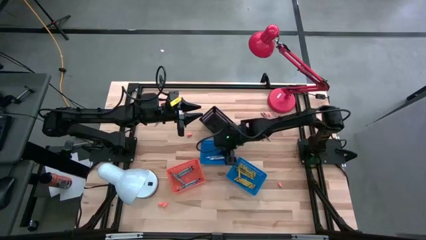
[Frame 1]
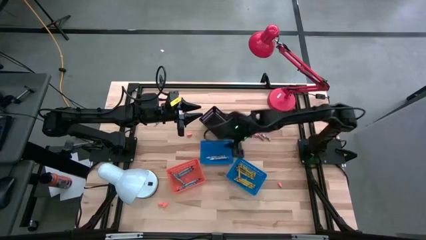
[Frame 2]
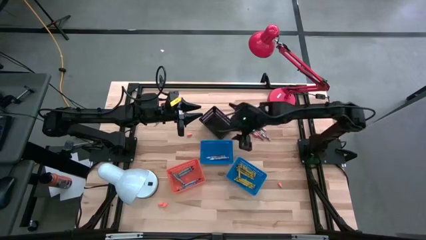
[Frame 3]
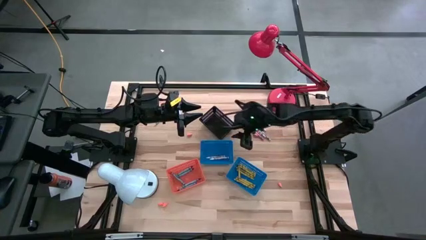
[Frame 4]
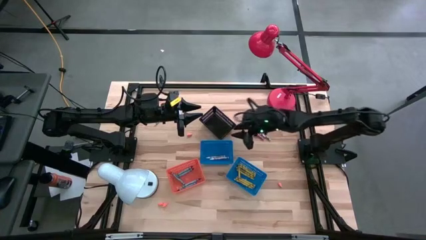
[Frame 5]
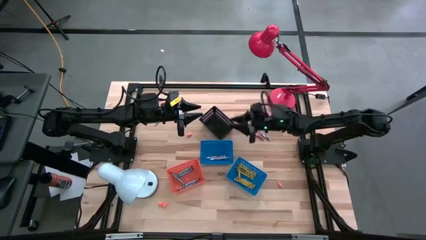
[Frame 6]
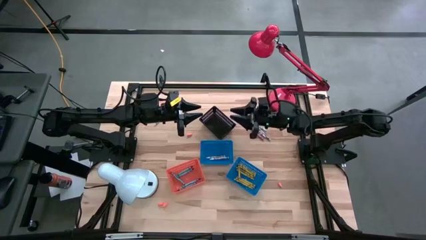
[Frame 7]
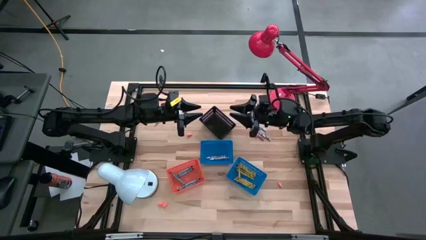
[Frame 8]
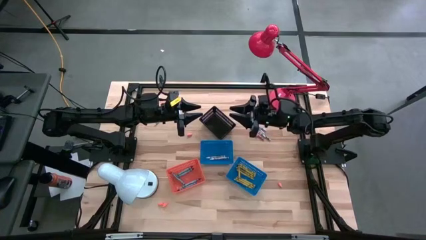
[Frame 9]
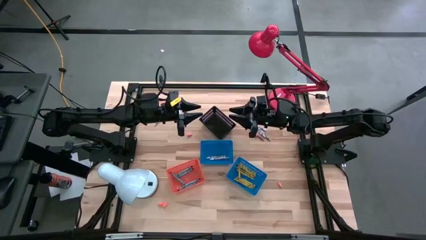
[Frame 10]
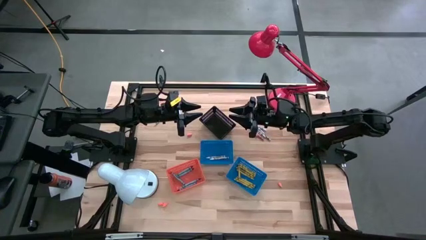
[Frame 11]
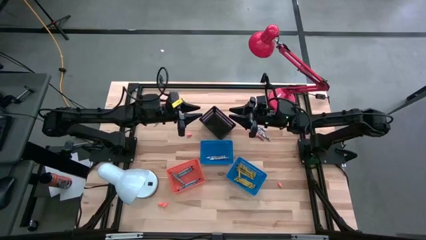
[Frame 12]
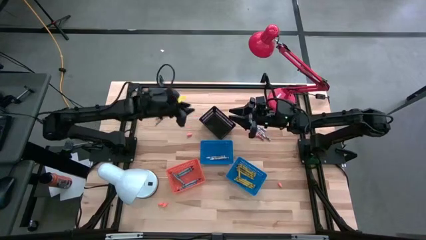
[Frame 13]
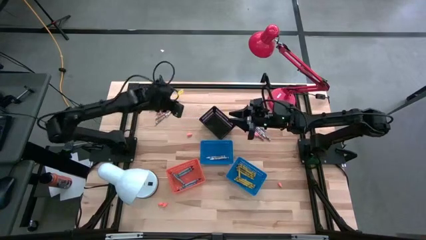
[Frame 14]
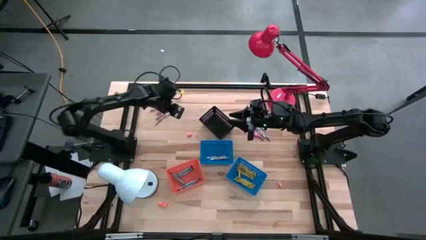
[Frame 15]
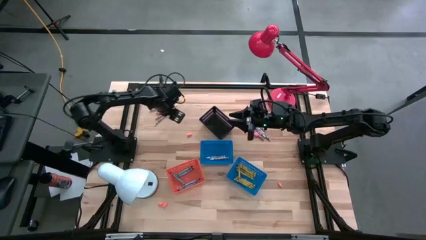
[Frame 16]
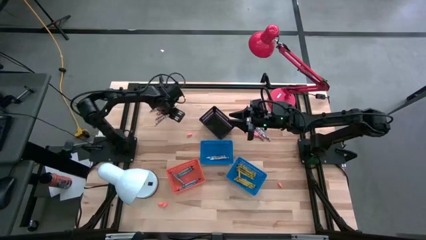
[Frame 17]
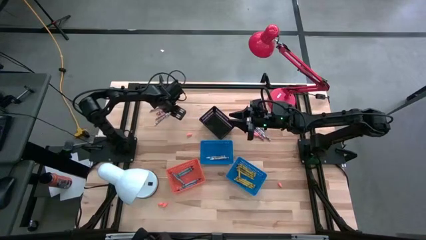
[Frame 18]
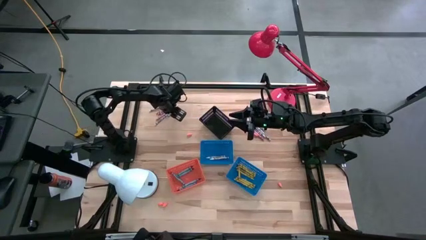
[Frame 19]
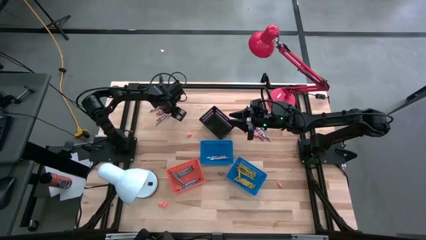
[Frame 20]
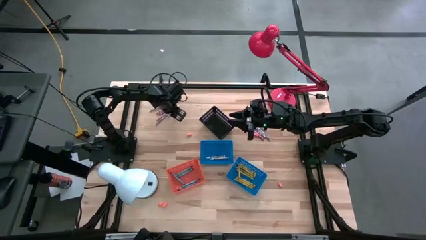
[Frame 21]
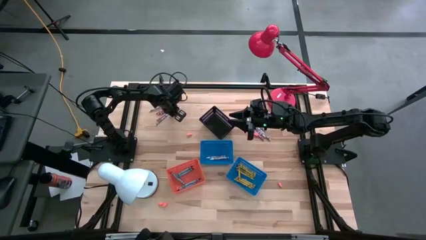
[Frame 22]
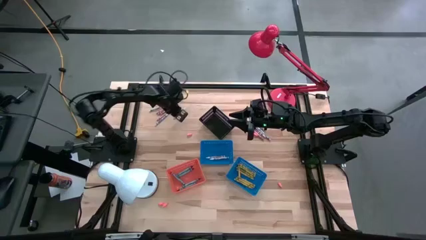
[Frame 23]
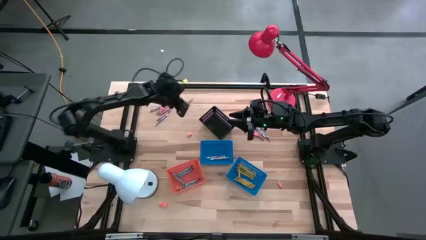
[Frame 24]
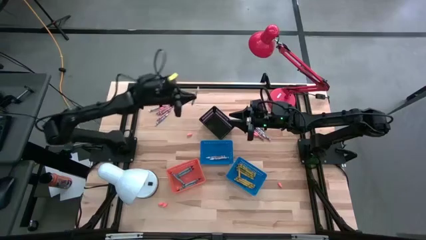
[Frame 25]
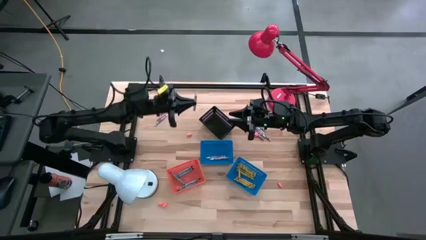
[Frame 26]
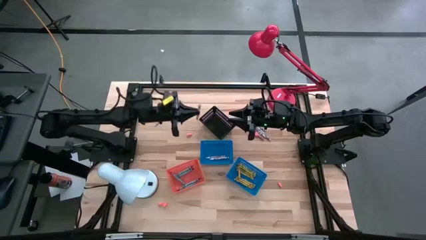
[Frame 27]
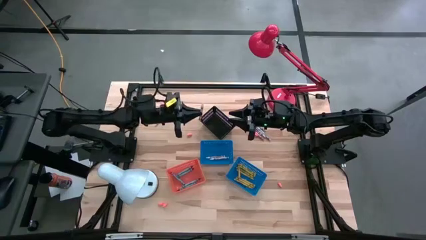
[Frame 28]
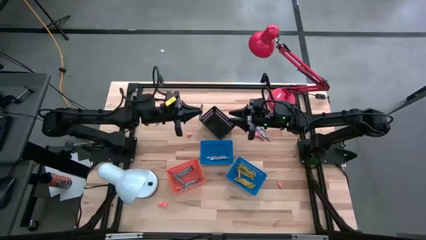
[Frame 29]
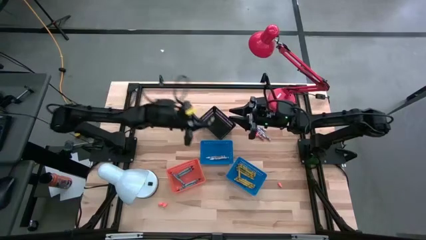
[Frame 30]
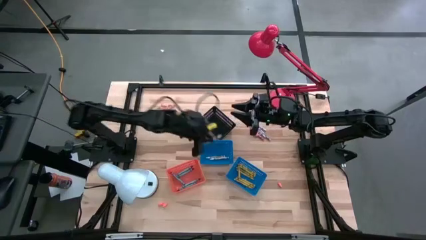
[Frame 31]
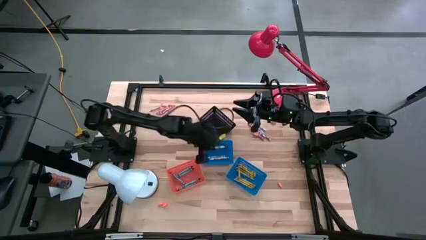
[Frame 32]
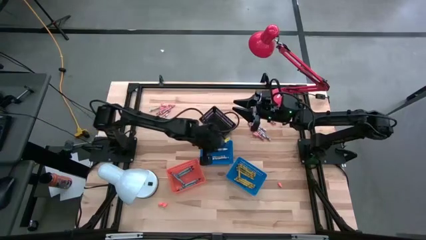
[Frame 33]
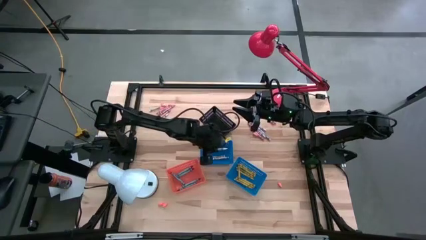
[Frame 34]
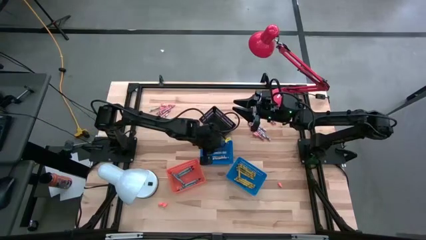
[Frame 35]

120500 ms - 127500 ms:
Task: Sort crayons
Put the white crayon into the left blue bin

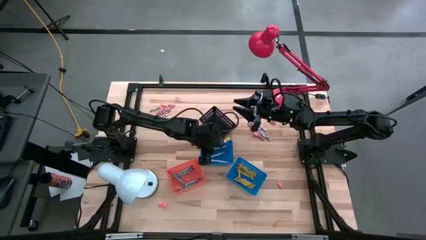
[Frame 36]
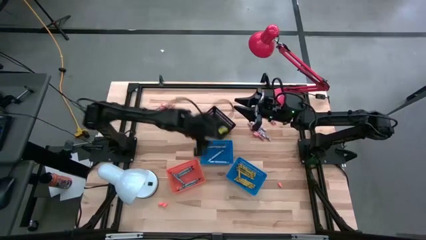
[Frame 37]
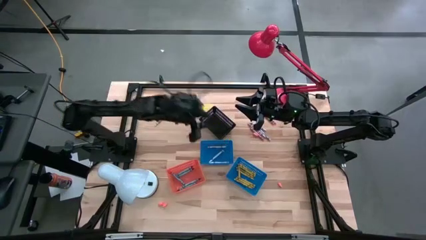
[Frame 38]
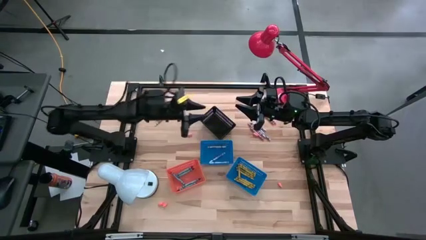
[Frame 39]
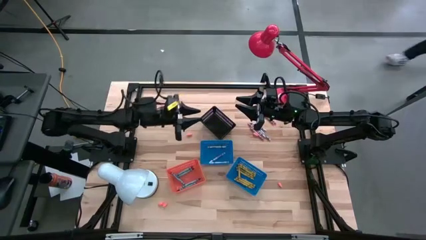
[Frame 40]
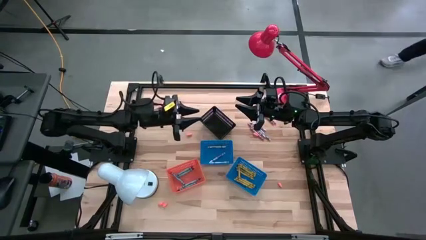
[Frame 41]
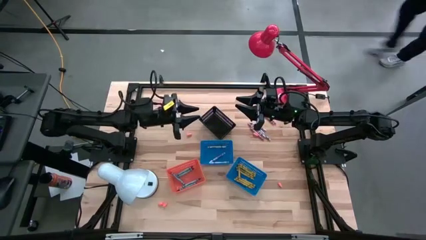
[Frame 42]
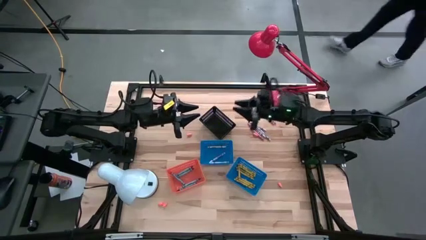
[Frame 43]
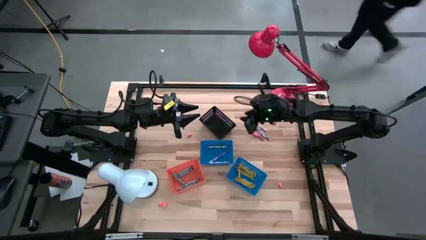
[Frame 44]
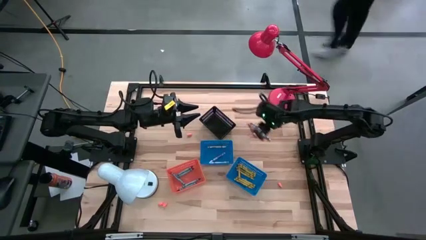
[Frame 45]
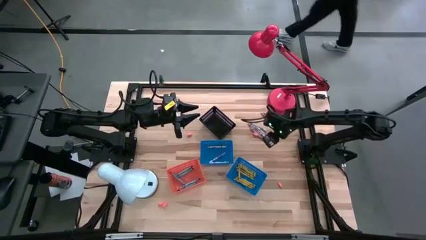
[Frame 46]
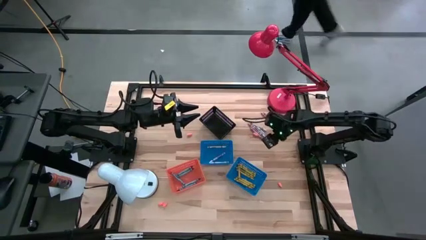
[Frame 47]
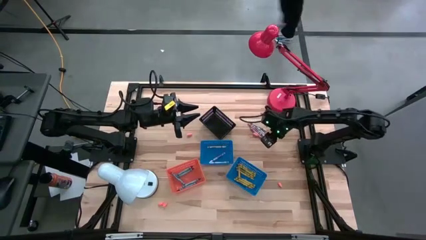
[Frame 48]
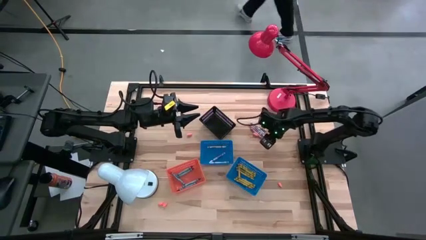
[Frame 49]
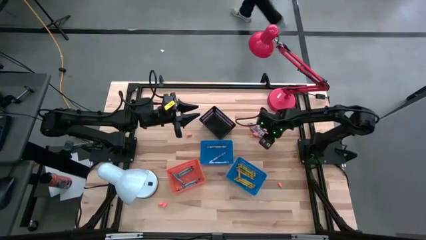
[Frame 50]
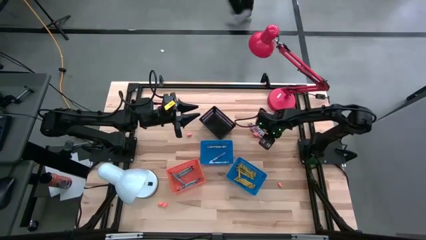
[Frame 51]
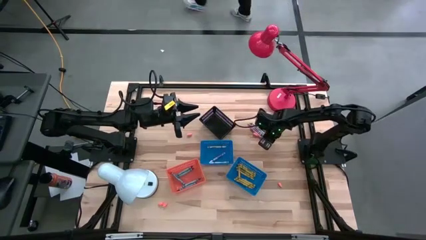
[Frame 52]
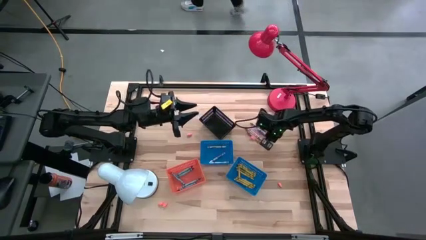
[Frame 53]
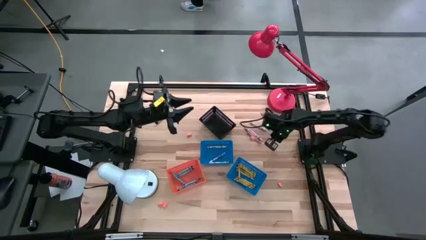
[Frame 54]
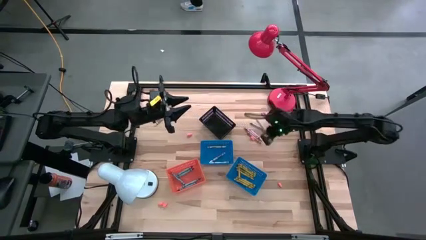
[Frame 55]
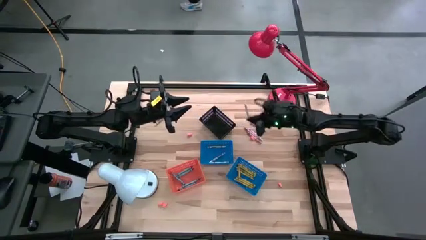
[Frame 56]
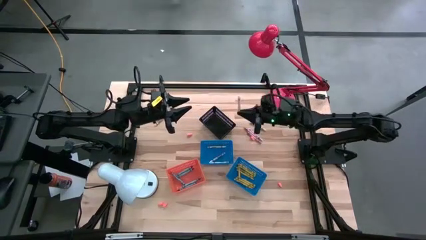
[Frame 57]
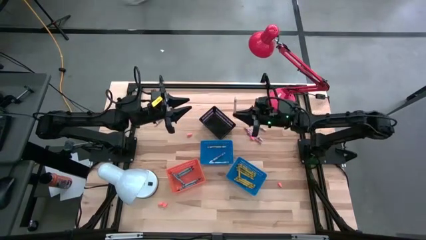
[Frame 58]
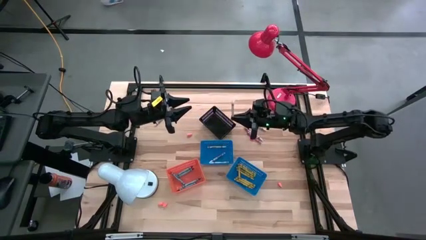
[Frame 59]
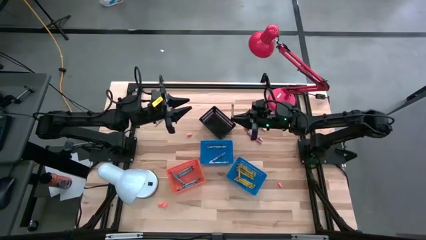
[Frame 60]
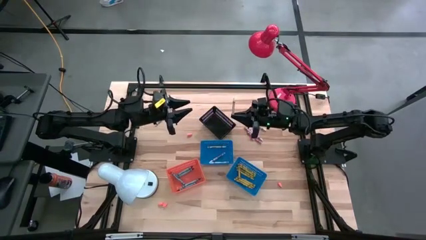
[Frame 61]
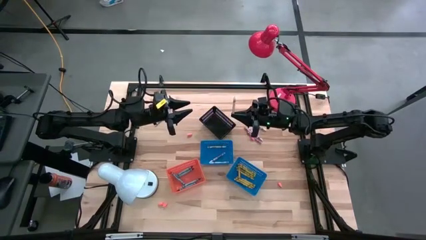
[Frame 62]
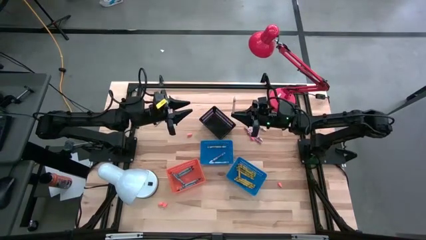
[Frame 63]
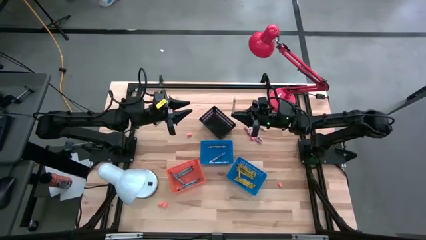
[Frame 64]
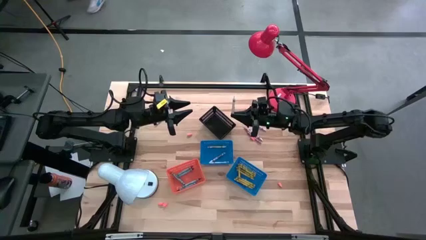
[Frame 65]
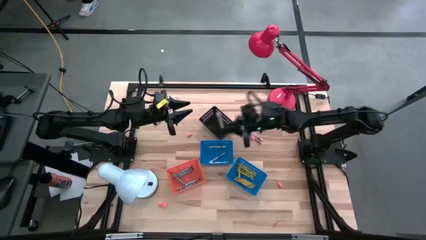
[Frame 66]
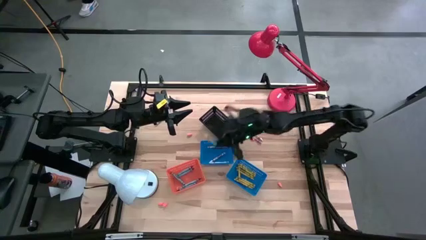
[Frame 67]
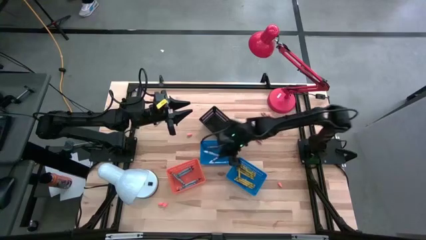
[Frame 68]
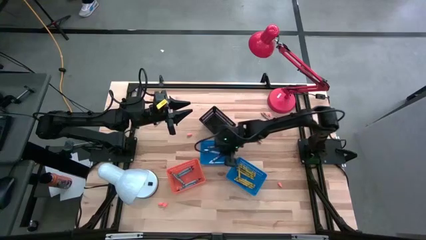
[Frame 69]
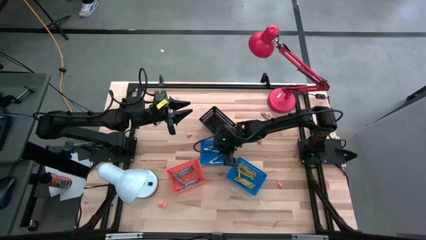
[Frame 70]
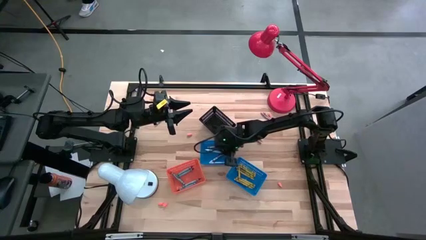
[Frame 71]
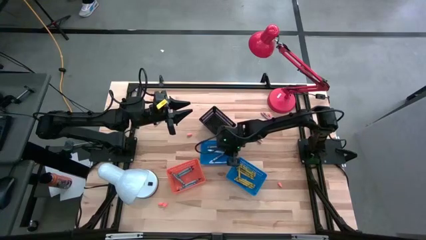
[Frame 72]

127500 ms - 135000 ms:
Put the white crayon into the left blue bin

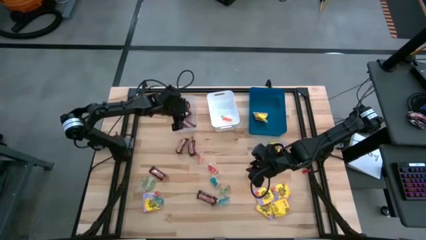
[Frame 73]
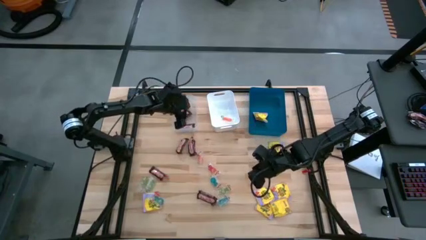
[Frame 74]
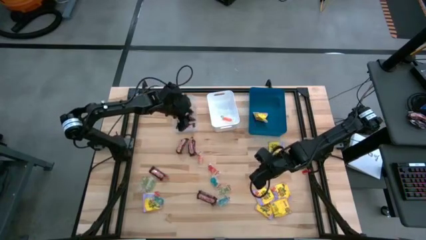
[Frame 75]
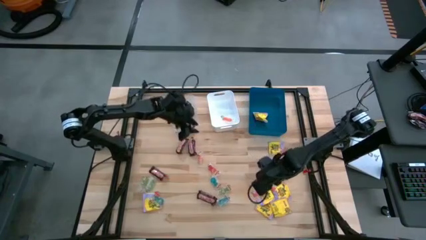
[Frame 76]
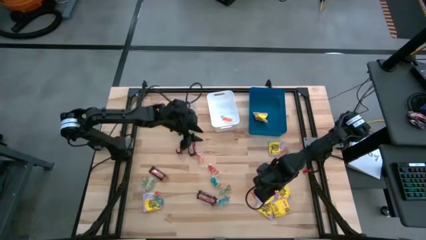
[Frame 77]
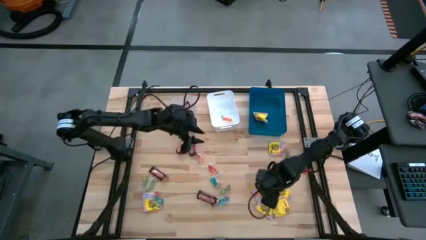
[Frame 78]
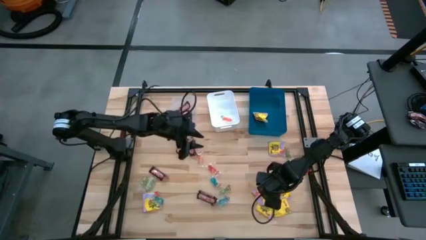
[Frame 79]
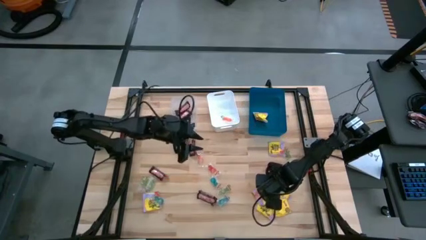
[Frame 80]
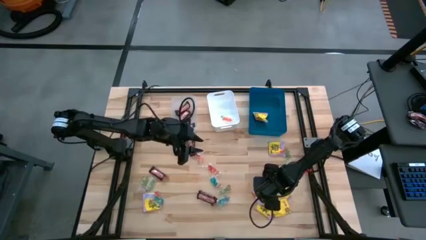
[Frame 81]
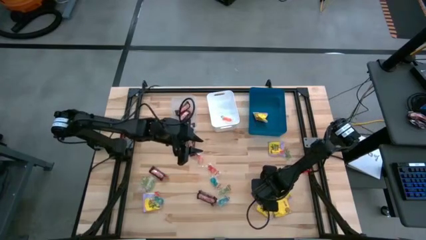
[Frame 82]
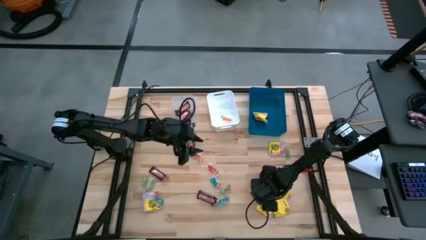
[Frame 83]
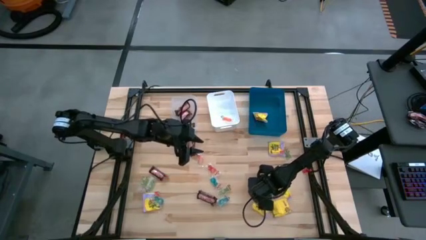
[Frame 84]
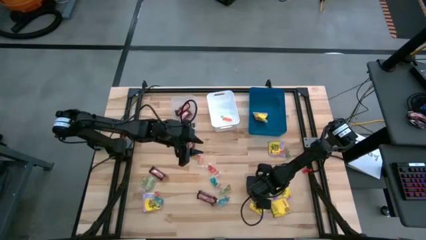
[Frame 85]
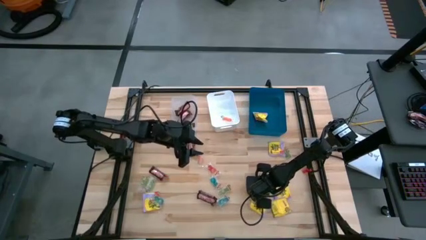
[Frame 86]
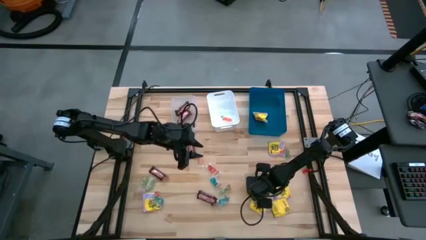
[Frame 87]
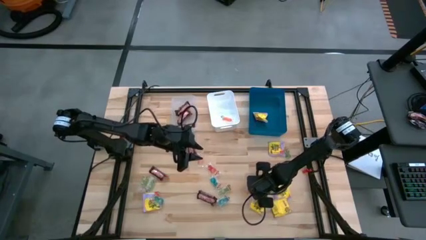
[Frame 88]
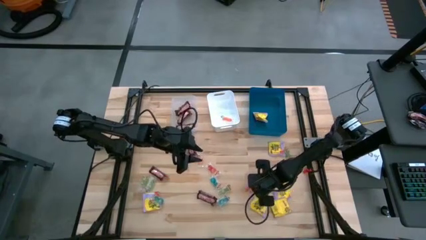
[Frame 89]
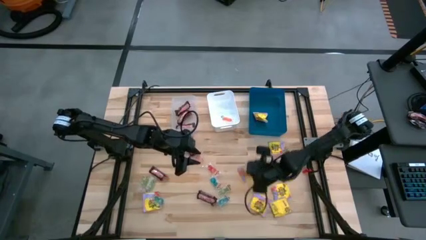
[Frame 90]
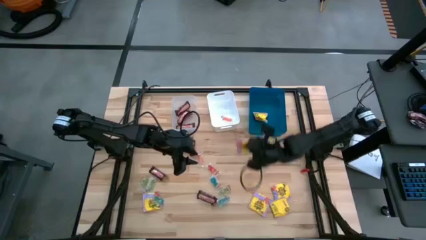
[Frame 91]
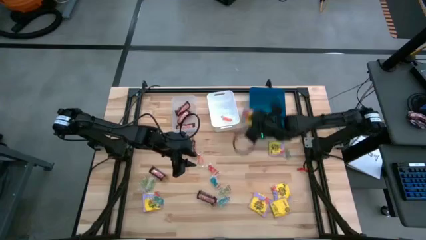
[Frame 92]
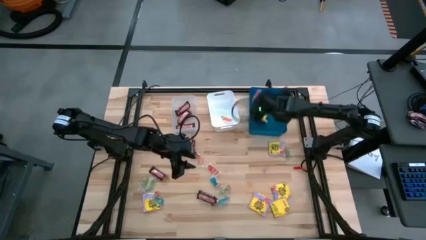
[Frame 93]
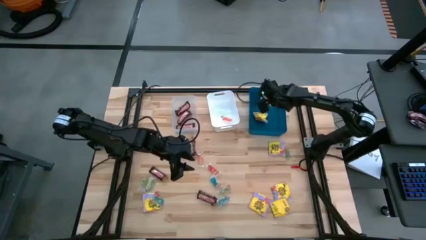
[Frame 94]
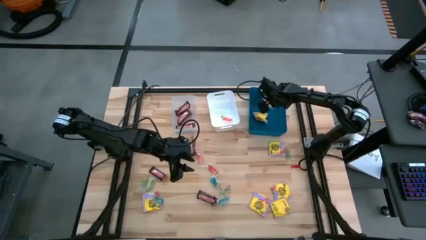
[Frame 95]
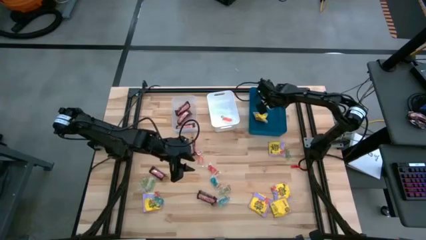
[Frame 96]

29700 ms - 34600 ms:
Task: Sort candy
Put the bottom right yellow sour patch candy into the blue bin
